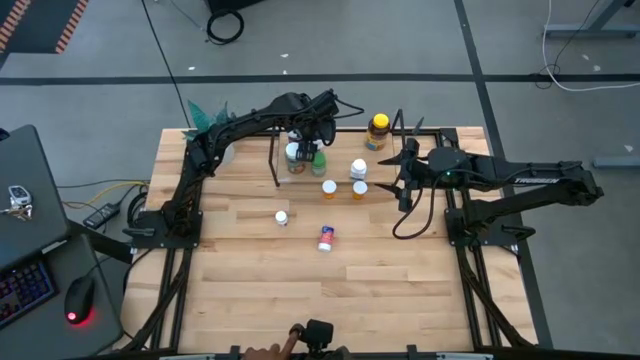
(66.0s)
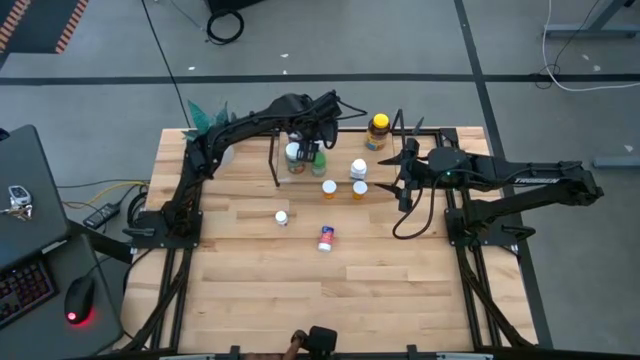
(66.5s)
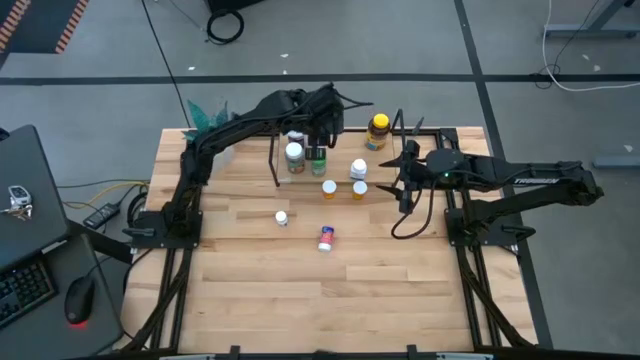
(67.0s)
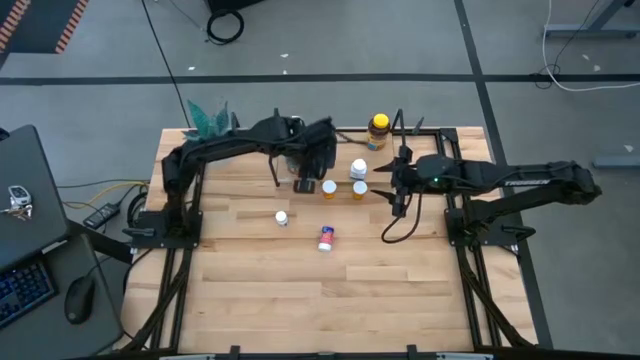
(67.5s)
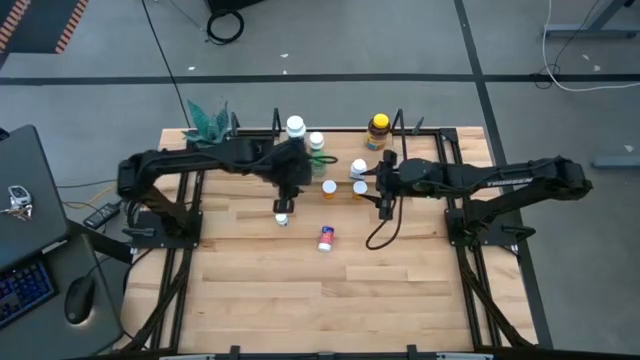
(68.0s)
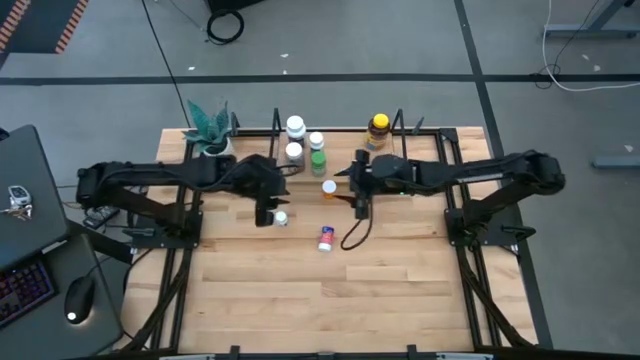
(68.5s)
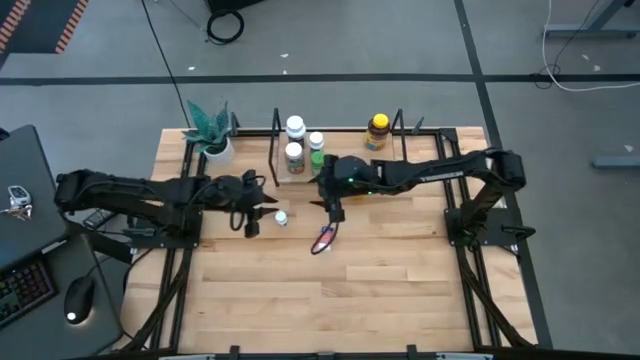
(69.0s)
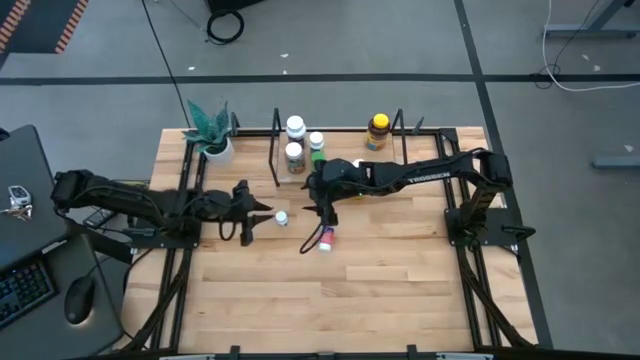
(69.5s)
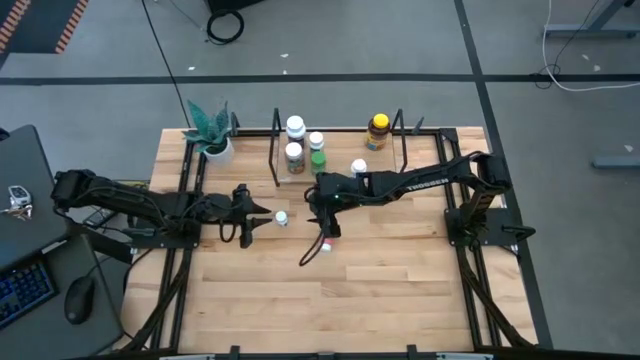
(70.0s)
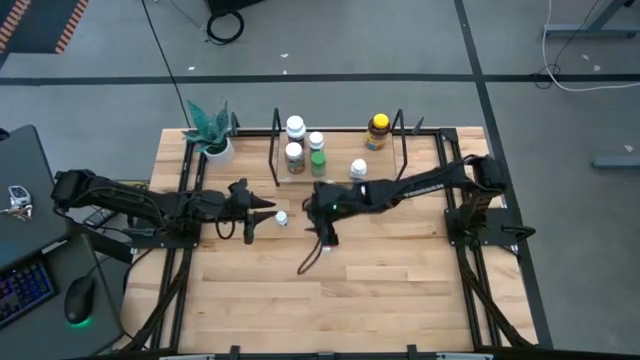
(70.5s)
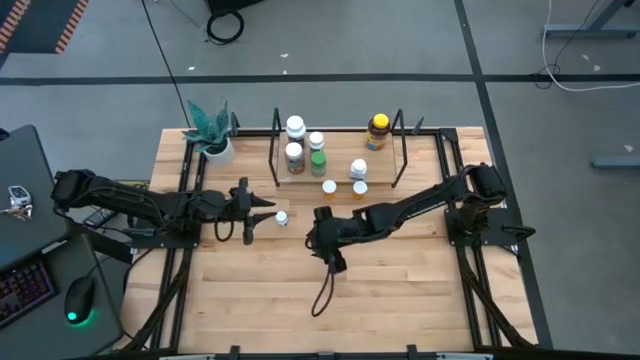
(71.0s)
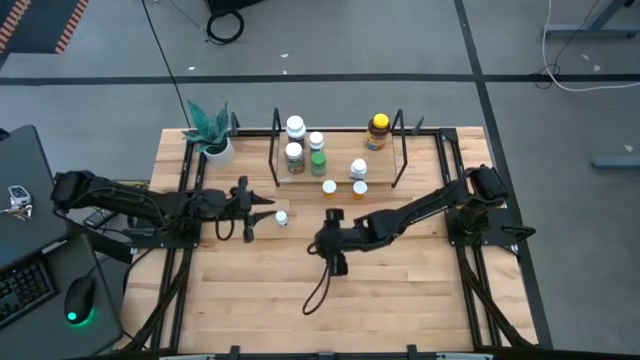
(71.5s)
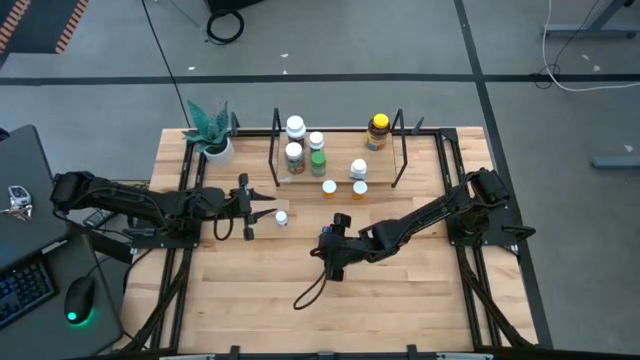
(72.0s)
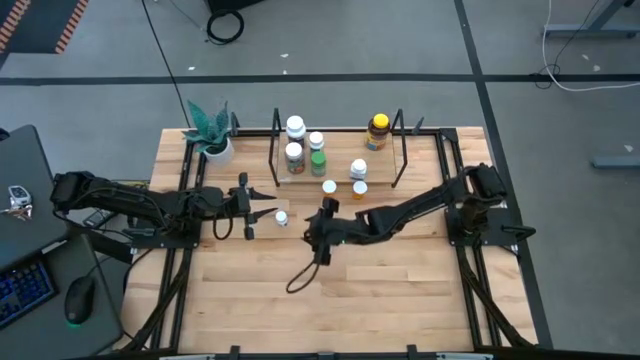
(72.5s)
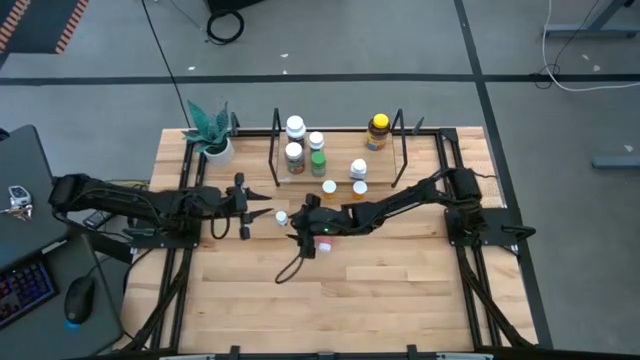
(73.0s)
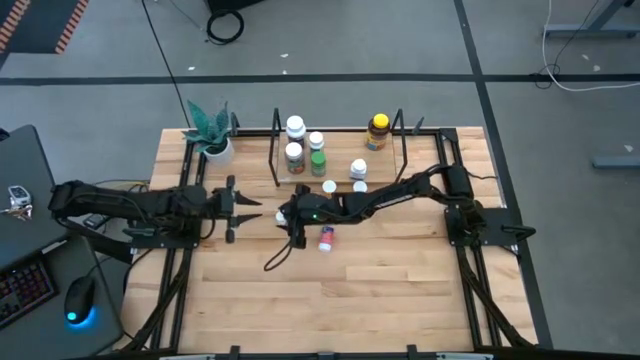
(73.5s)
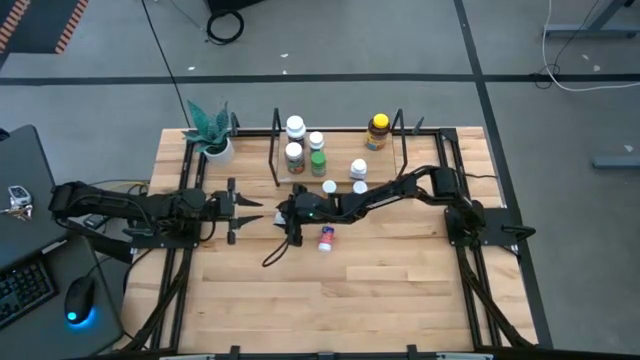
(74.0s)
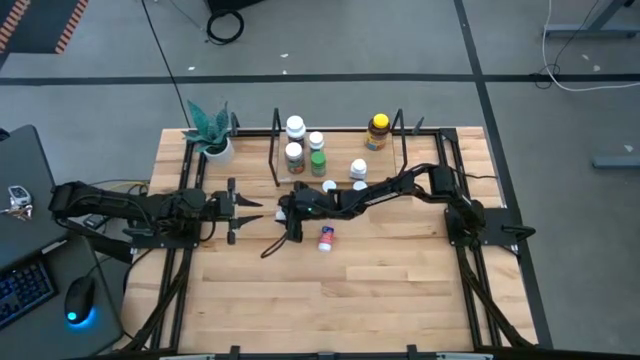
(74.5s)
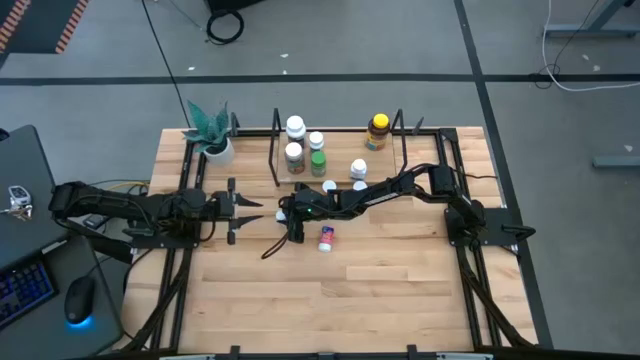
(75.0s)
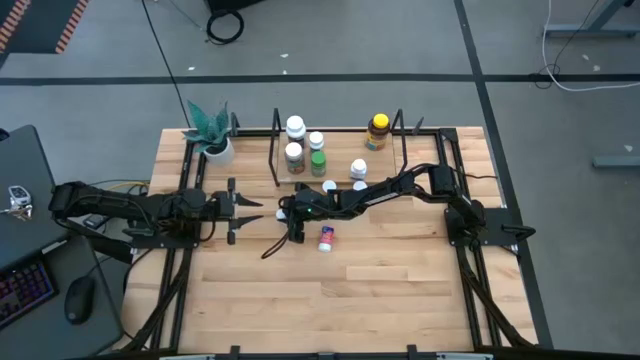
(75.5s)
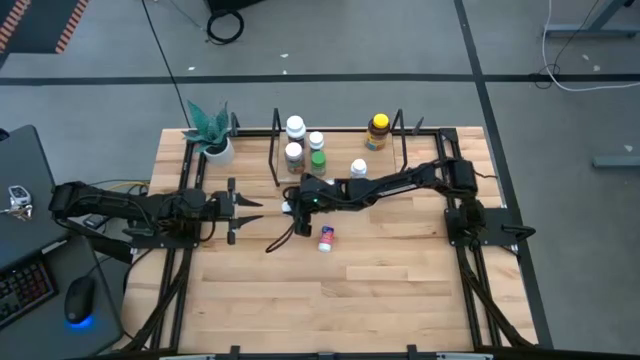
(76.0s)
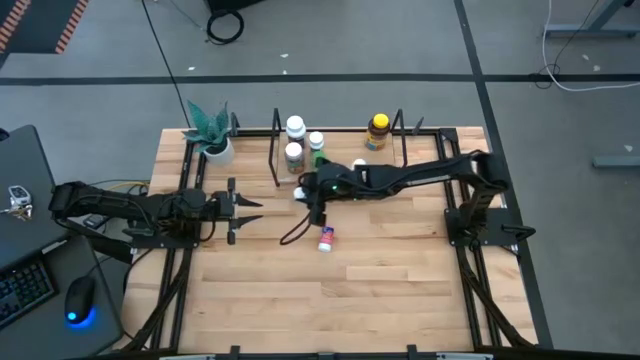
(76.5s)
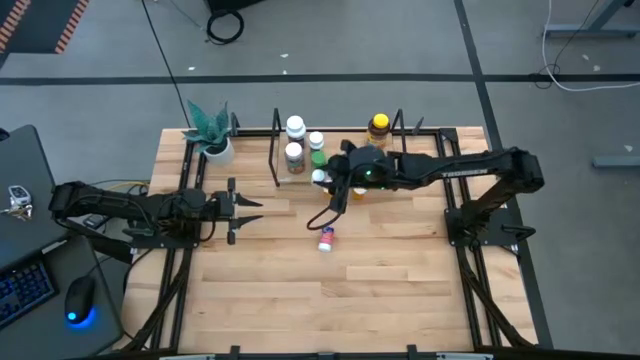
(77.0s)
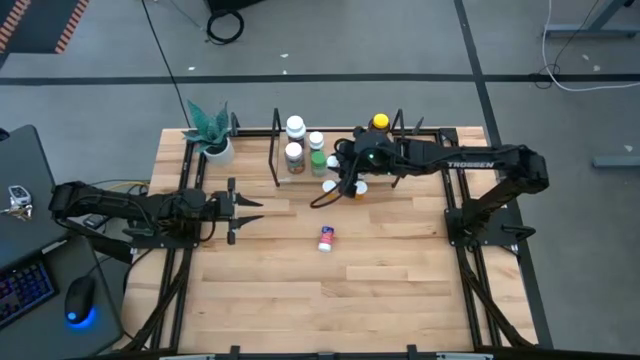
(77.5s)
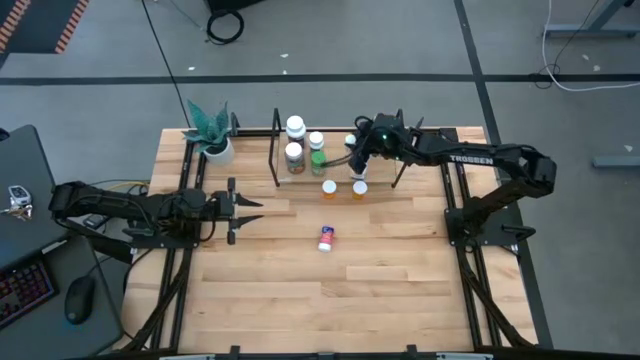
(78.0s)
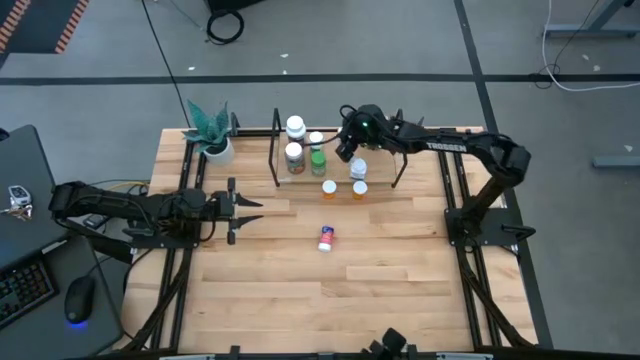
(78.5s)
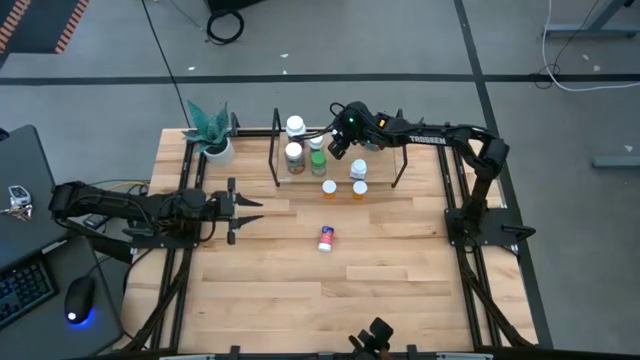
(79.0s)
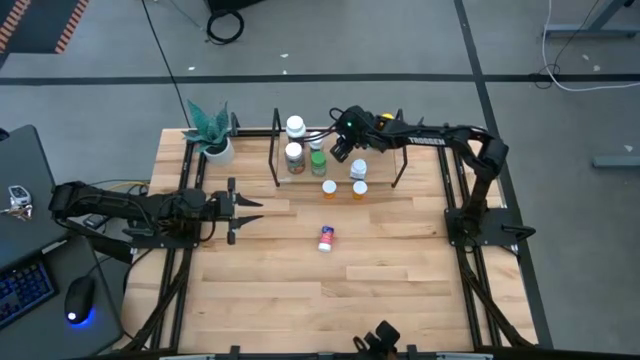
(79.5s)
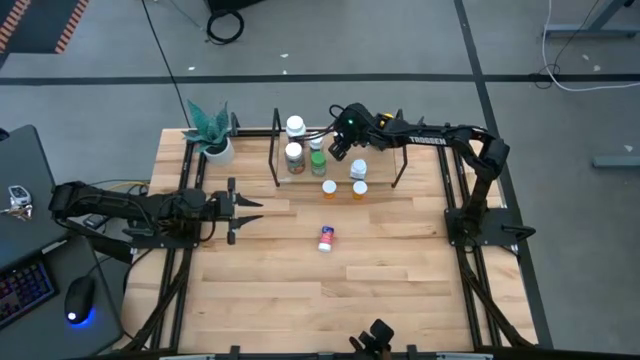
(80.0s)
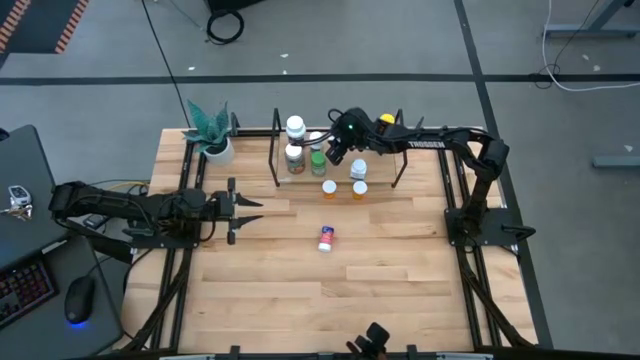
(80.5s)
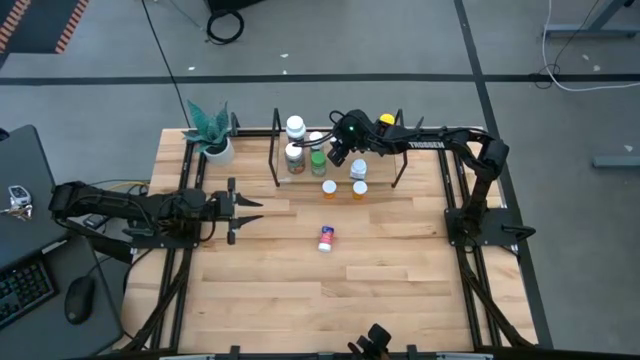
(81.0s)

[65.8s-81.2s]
Task: Pick and place medicine bottles onto shelf by color
Put the small white pill bottle on the shelf

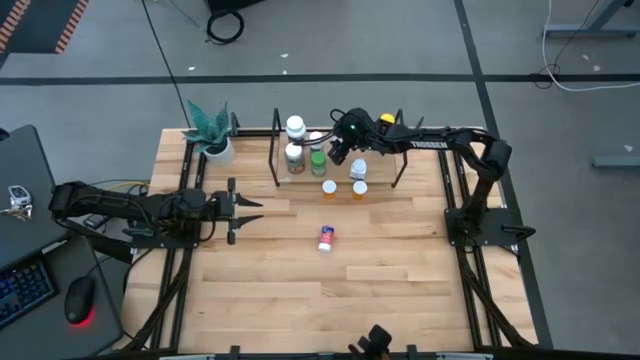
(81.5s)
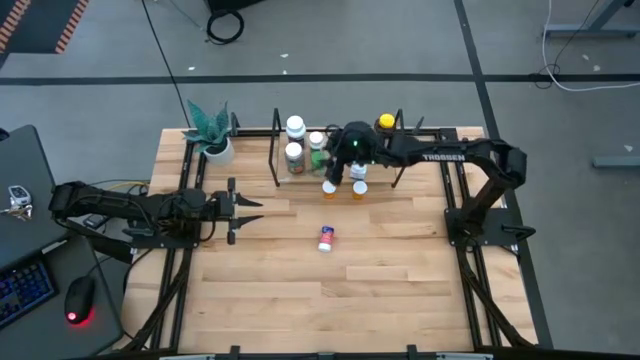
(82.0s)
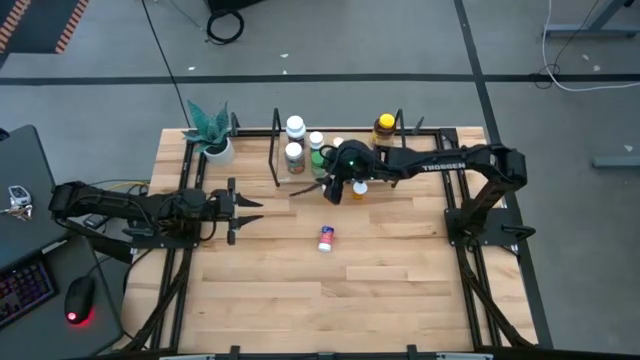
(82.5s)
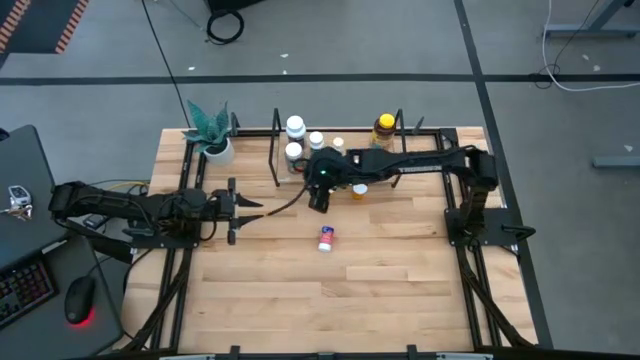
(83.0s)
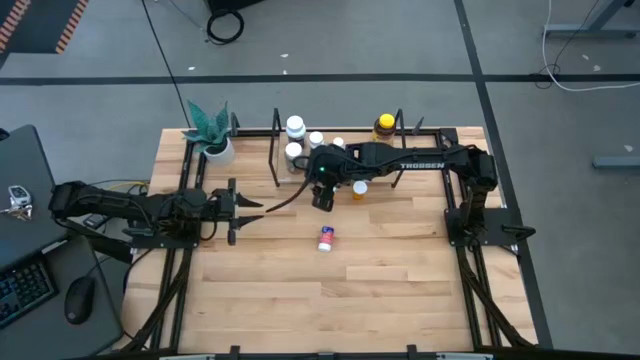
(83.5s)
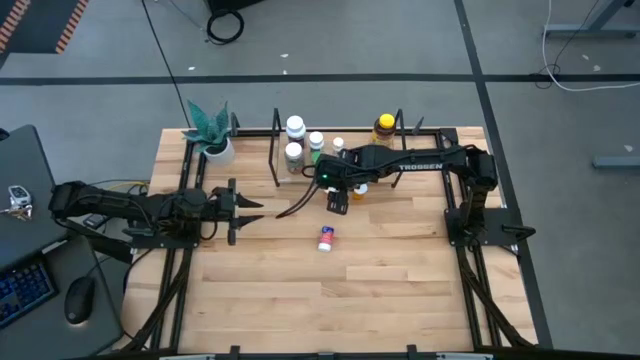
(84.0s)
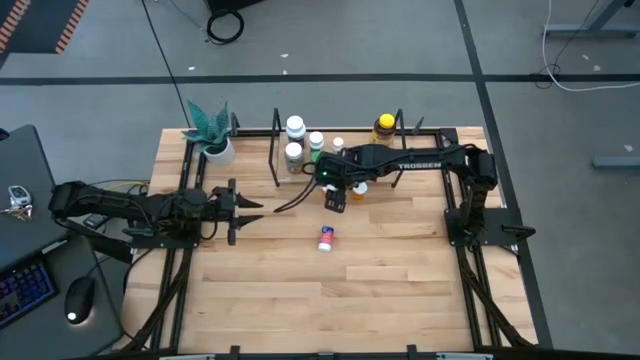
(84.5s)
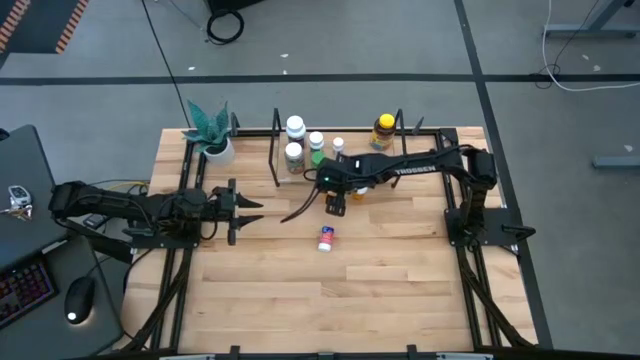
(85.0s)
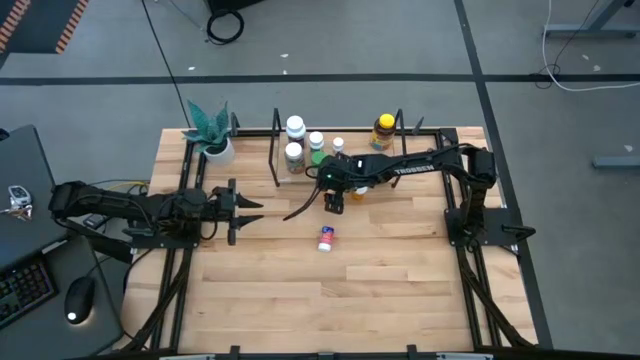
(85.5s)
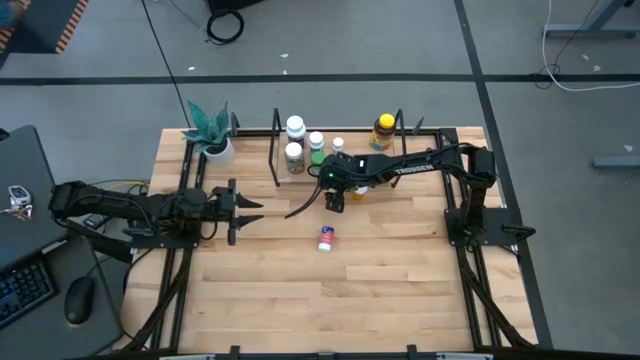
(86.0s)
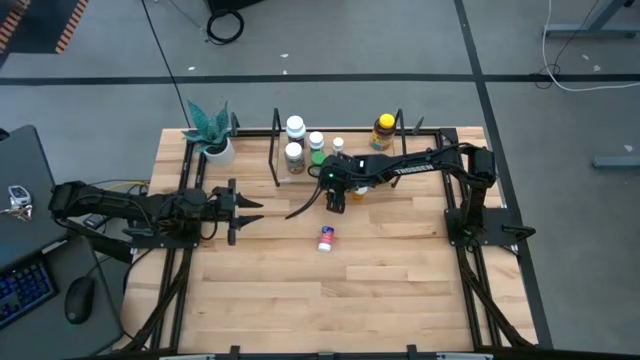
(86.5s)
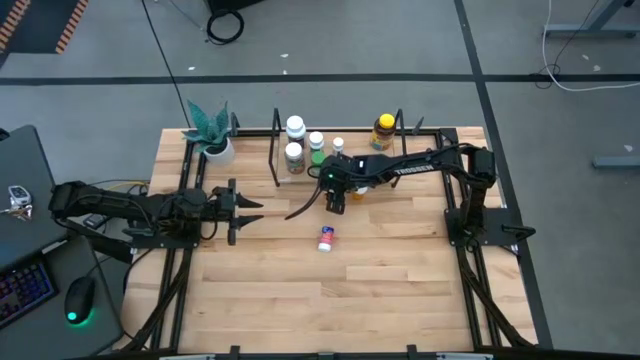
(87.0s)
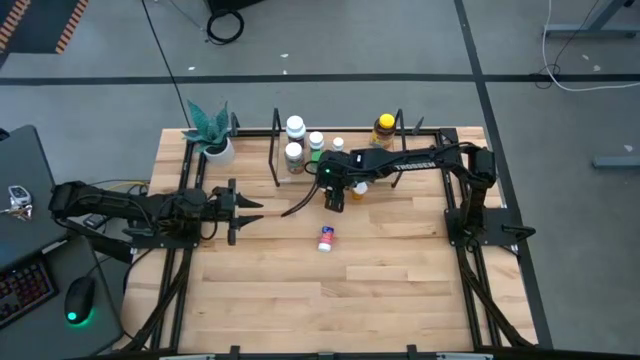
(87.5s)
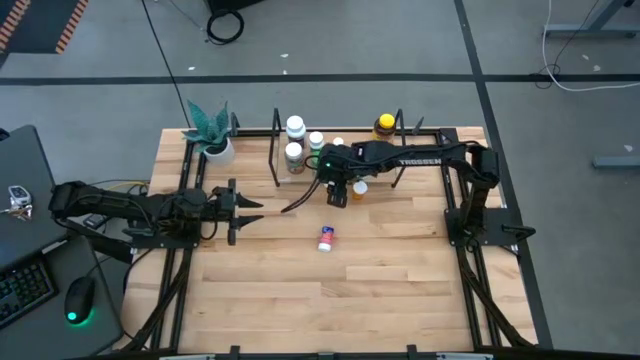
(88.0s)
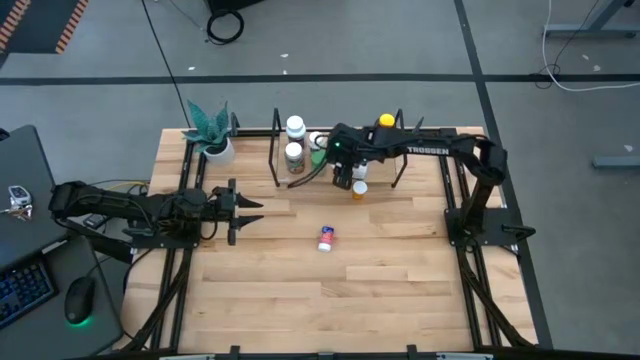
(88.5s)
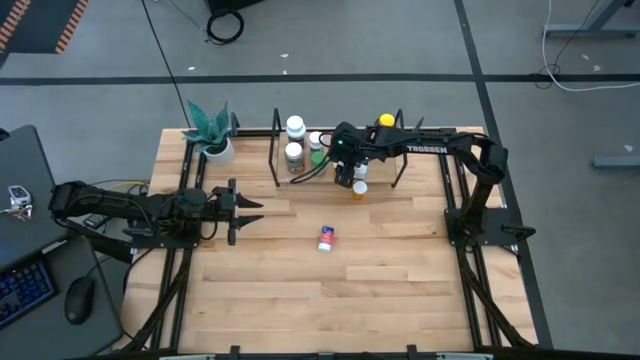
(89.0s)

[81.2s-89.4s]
Put the left orange pill bottle on the shelf
